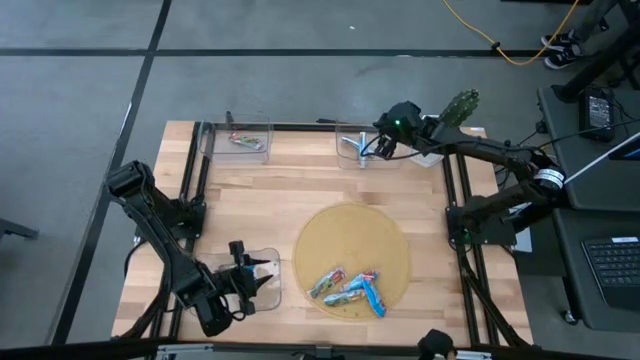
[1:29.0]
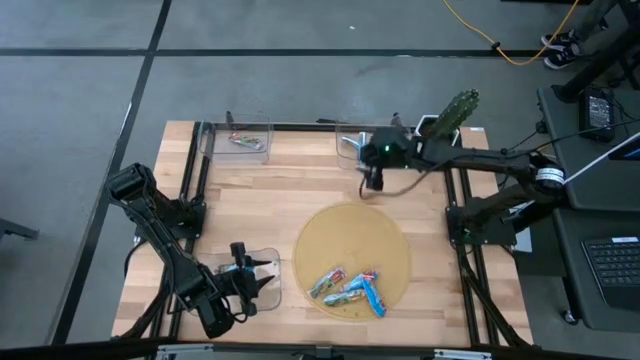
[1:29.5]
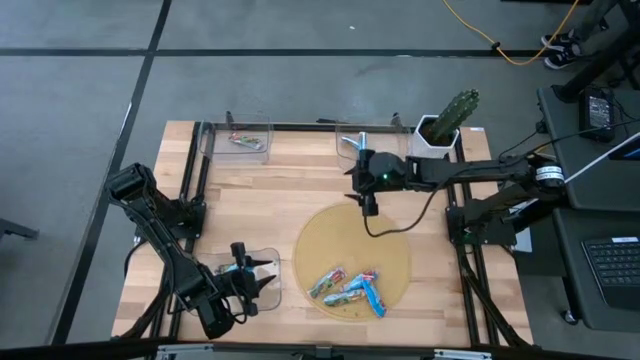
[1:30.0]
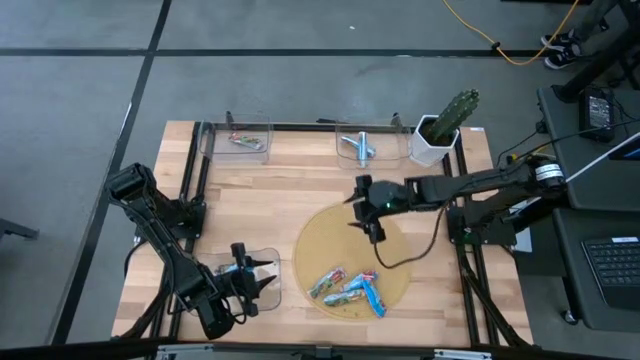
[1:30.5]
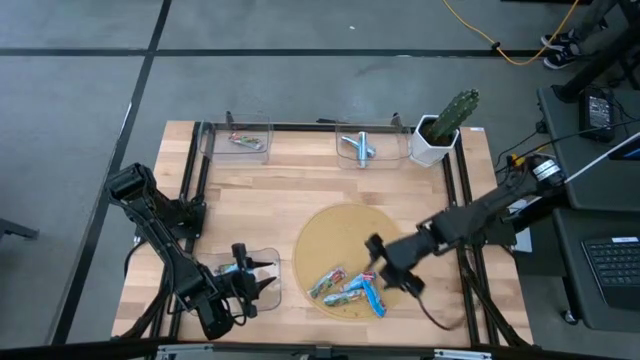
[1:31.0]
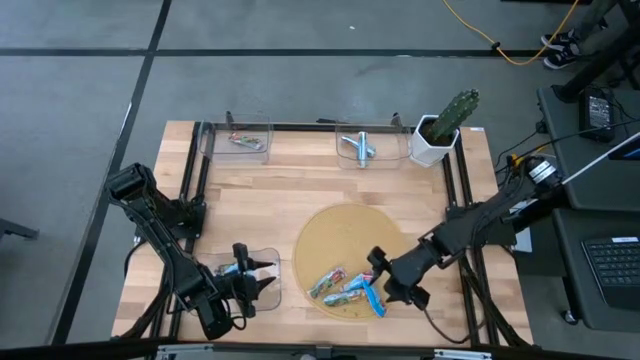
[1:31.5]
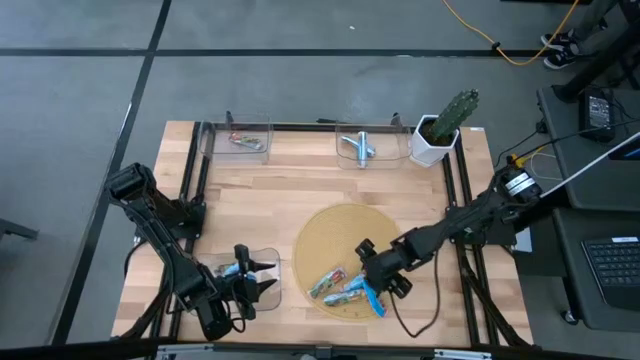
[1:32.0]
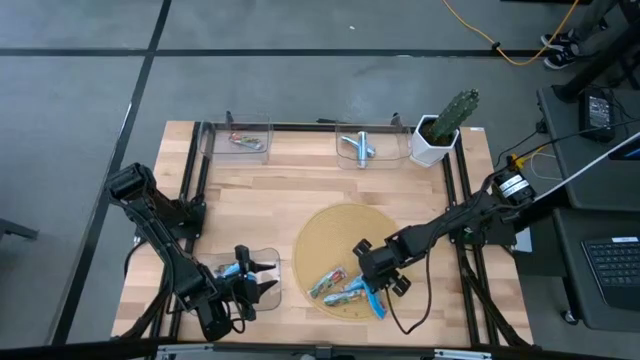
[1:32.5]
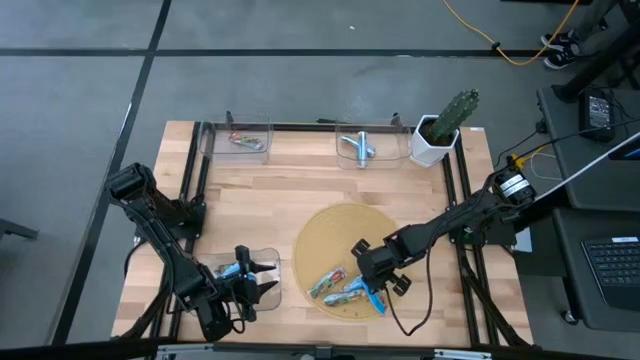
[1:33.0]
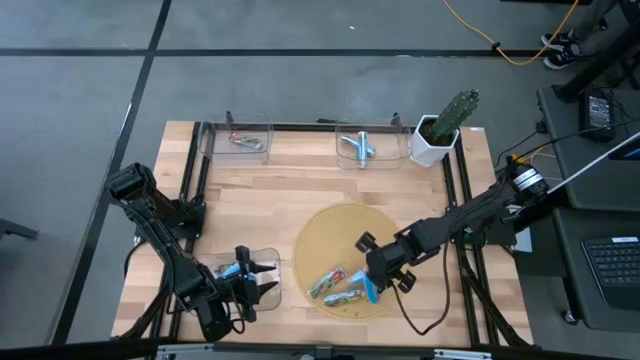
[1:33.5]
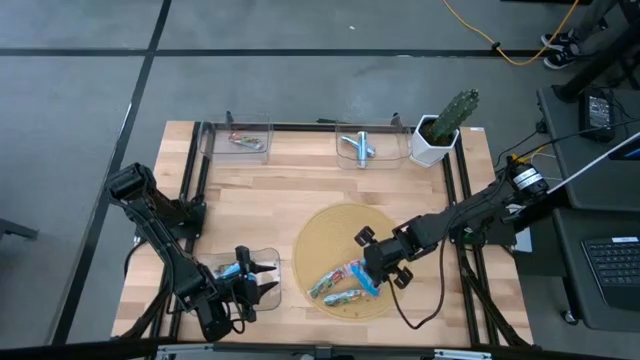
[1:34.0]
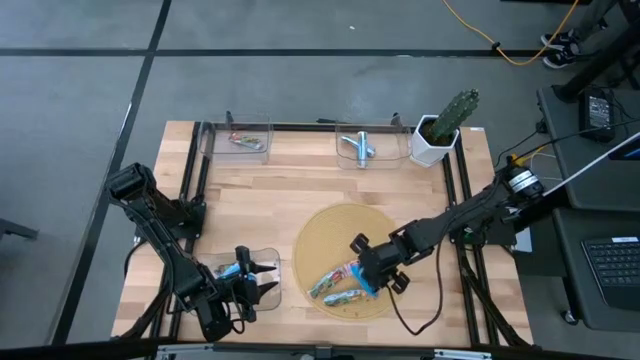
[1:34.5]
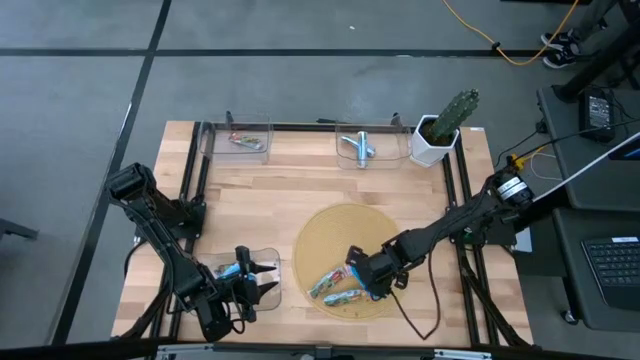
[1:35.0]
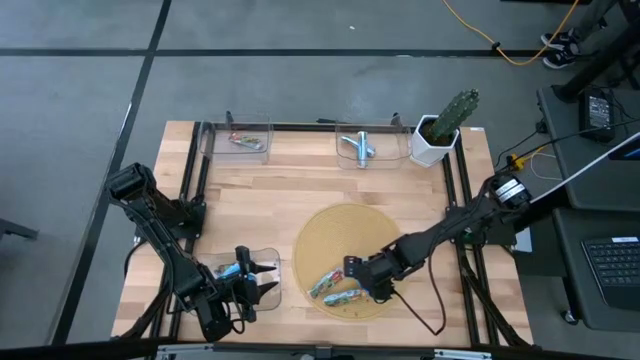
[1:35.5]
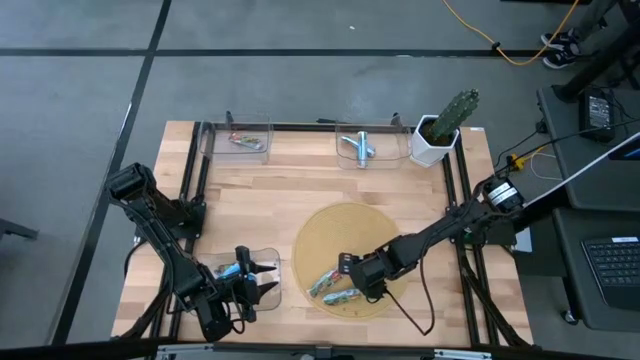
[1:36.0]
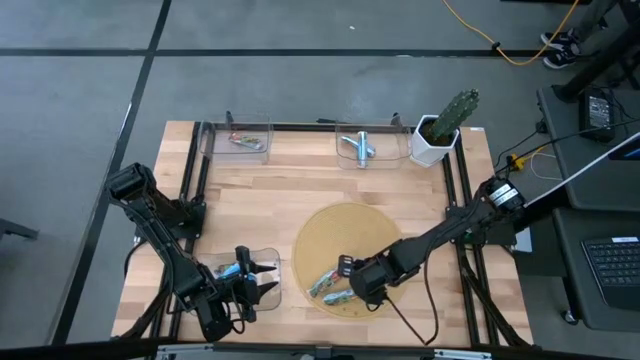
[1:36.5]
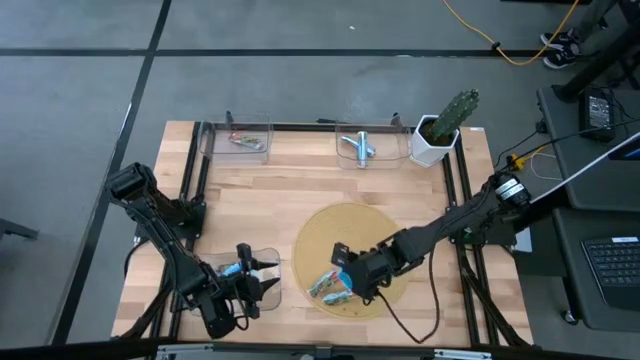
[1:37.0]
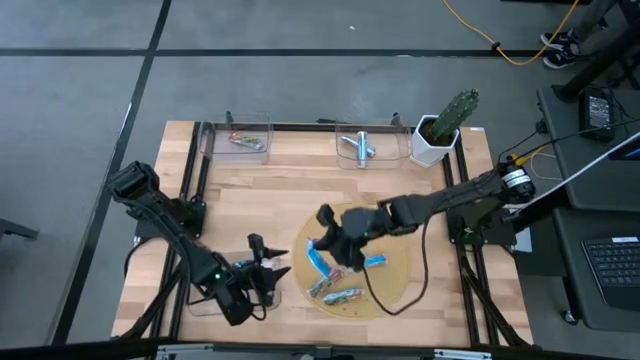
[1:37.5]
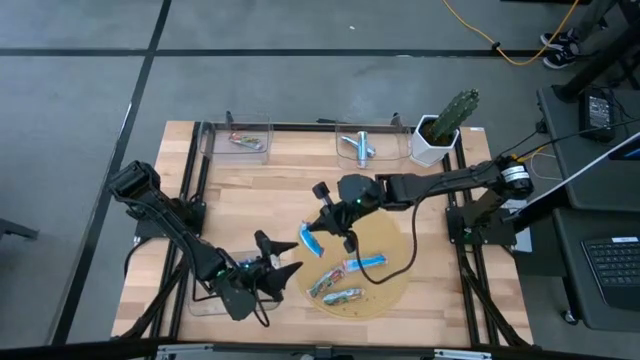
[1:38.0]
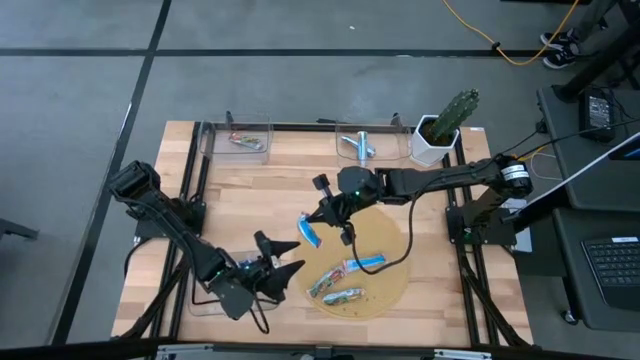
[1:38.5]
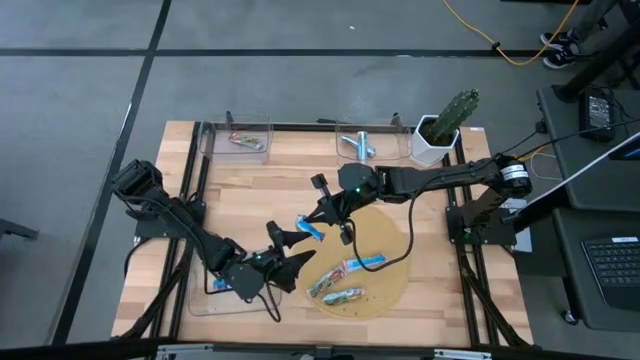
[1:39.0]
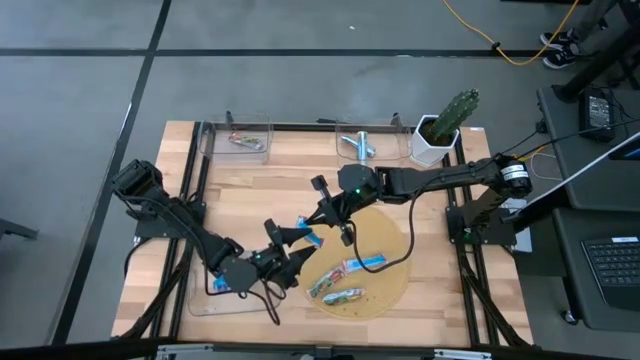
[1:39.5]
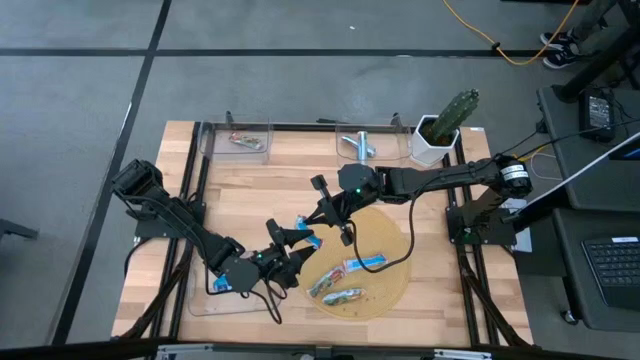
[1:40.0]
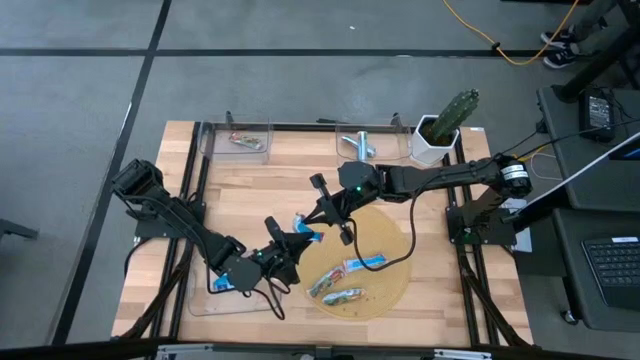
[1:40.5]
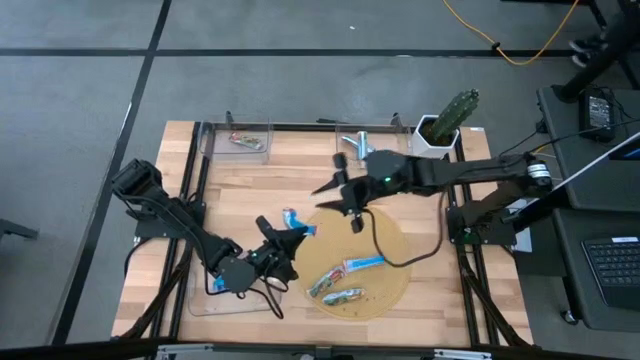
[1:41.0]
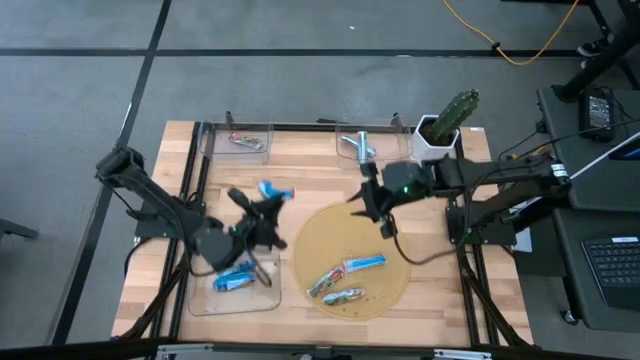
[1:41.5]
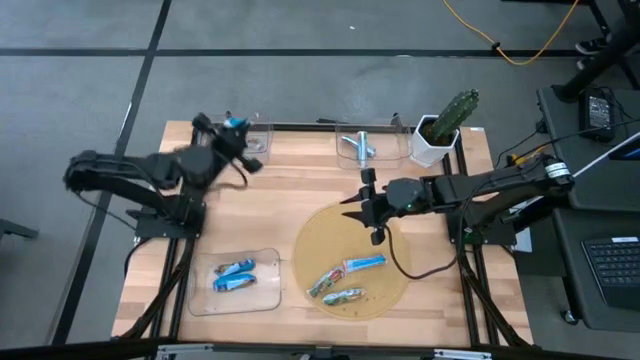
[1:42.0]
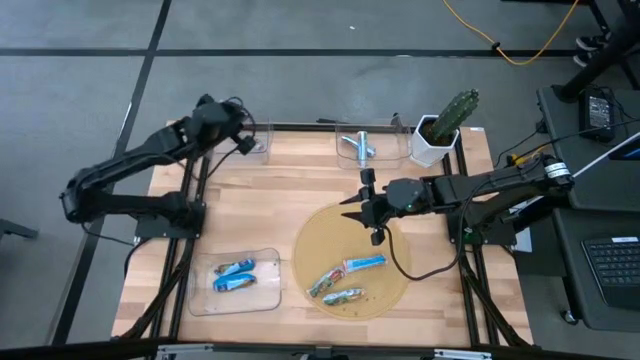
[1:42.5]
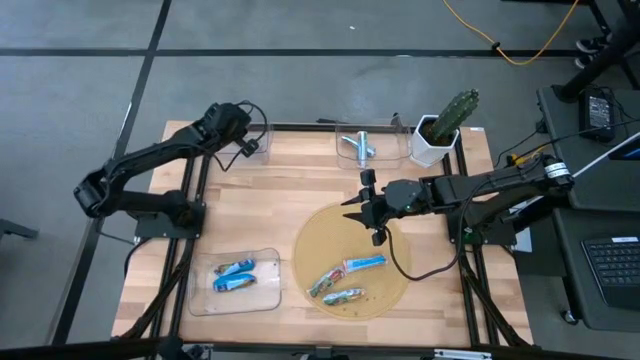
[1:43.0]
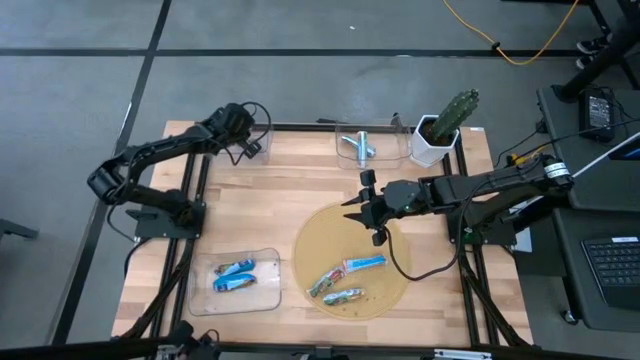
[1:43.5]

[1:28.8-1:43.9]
Task: Pick and place Granola Bars by type
Put the red granola bar into the top left transparent bin

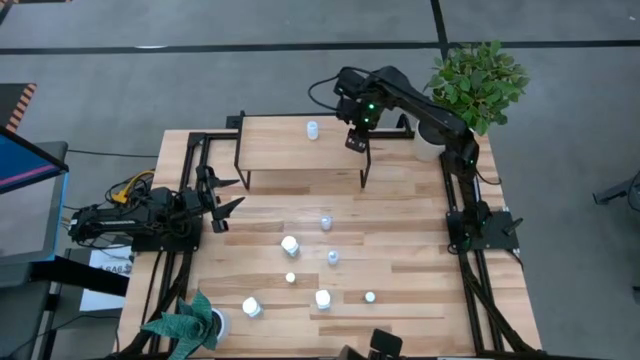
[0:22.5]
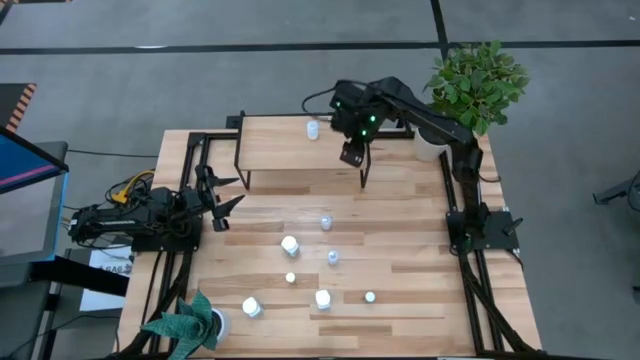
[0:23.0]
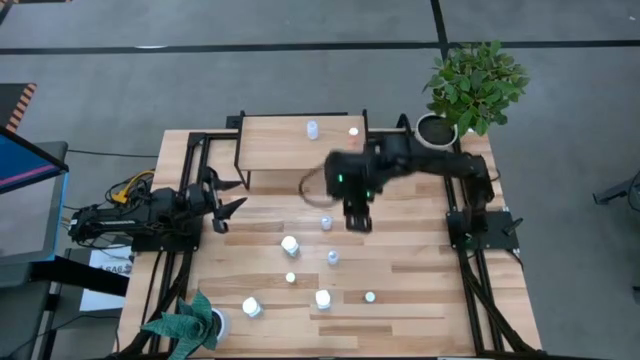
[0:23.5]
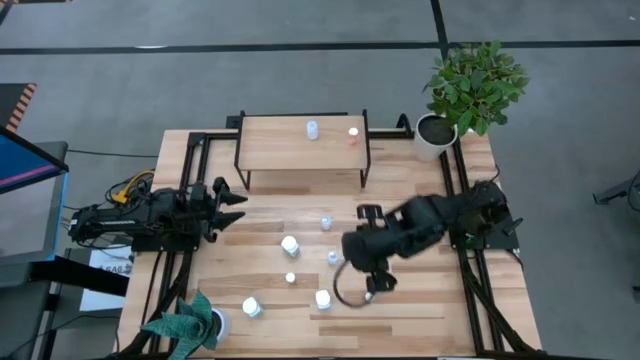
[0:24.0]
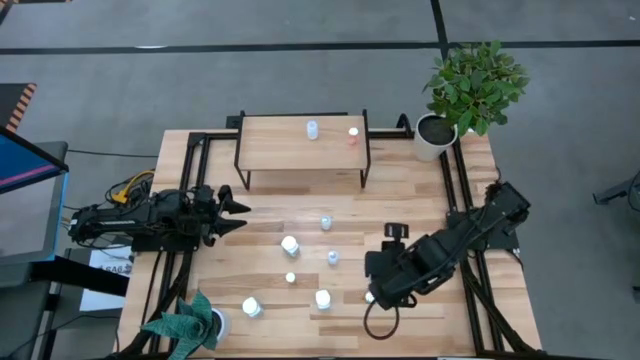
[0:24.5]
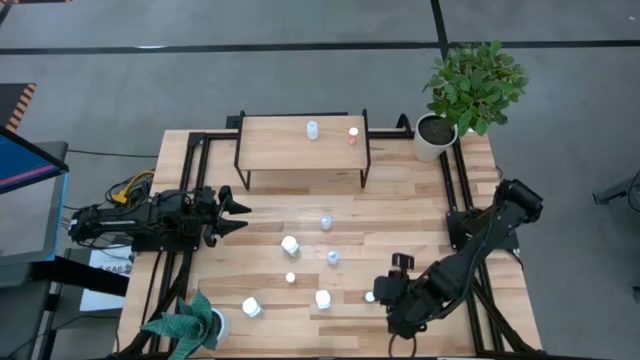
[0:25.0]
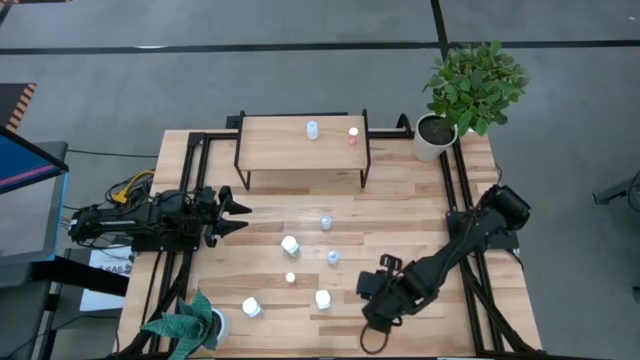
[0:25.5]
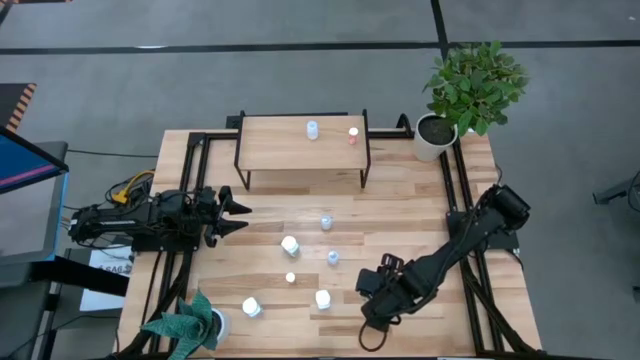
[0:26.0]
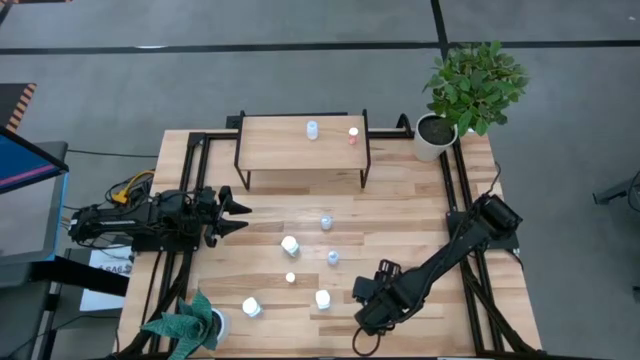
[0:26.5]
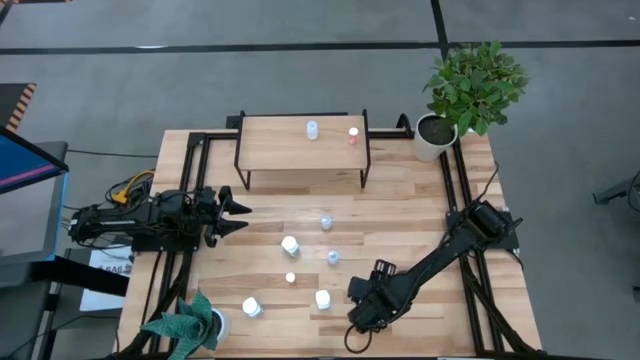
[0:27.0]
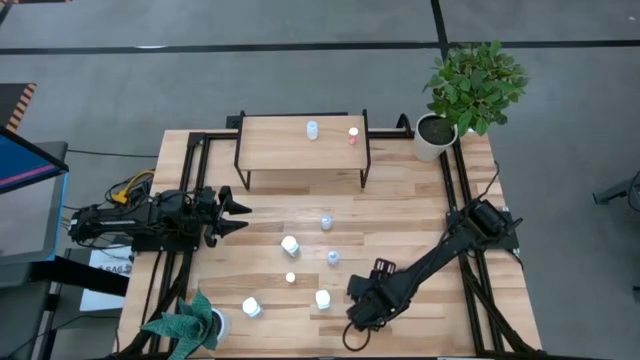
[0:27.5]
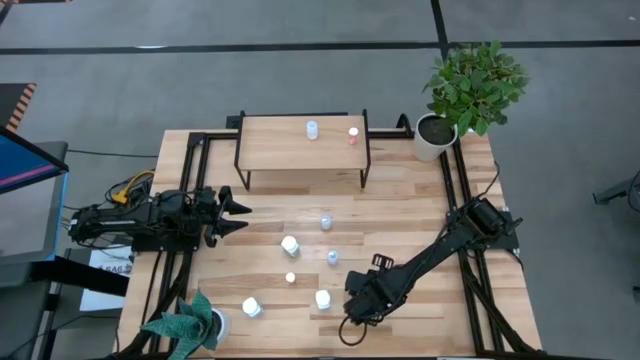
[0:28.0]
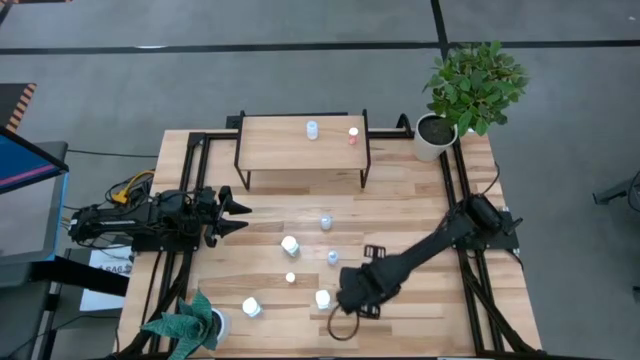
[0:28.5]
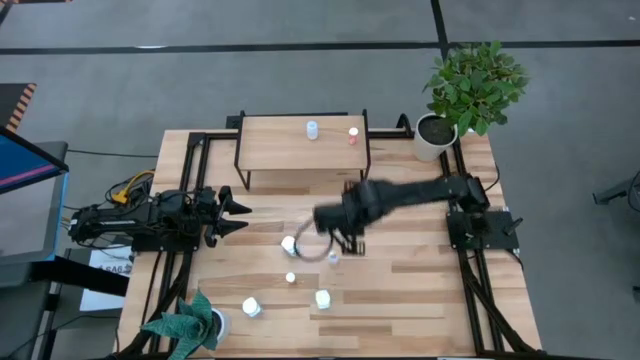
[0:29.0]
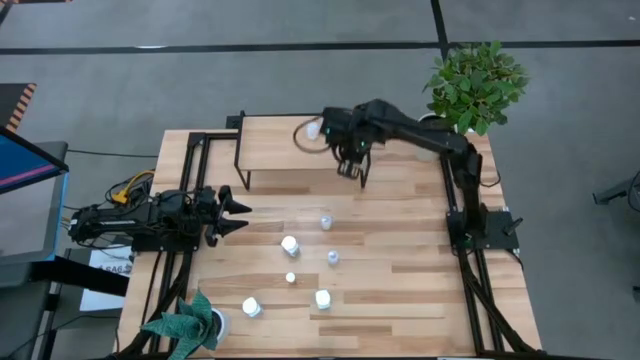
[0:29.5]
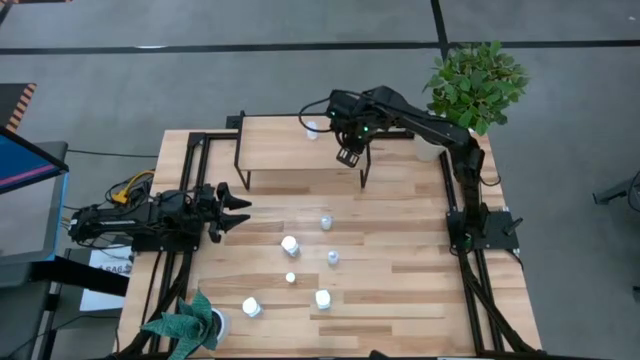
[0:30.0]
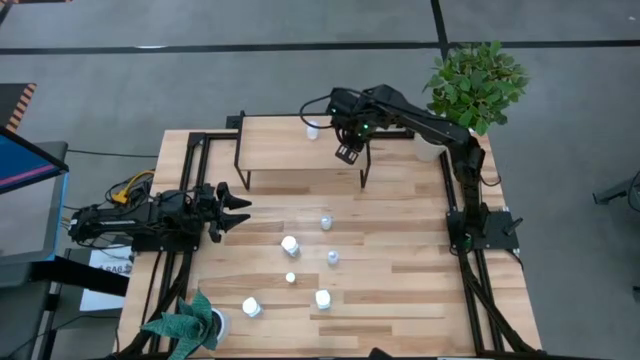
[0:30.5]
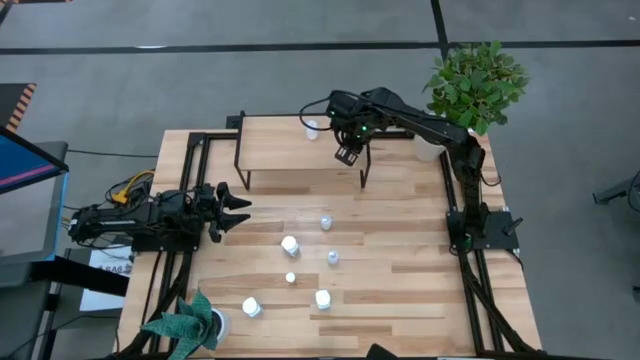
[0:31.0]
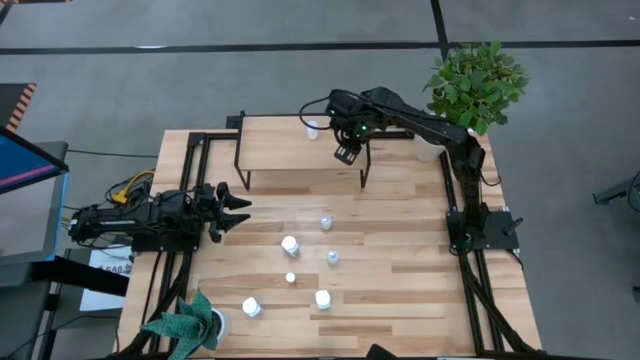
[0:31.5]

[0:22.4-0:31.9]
Task: Pick and place medicine bottles onto shelf by color
Put the blue pill bottle on the shelf
